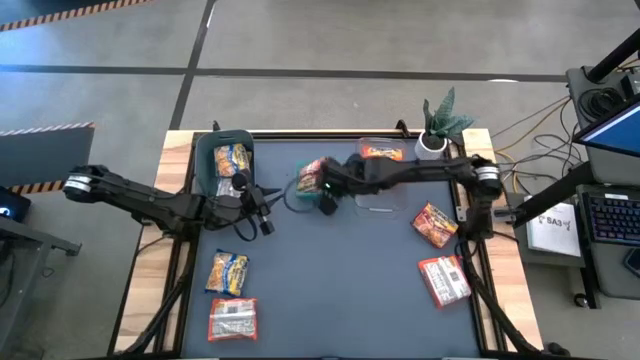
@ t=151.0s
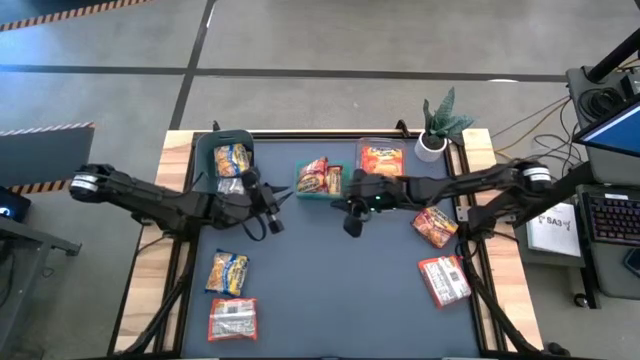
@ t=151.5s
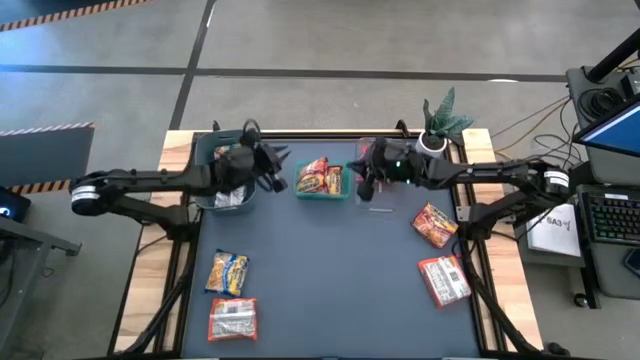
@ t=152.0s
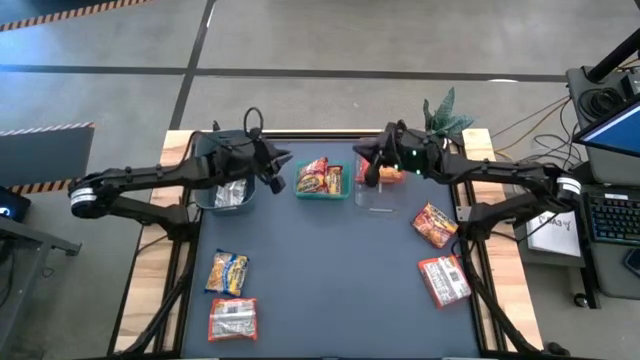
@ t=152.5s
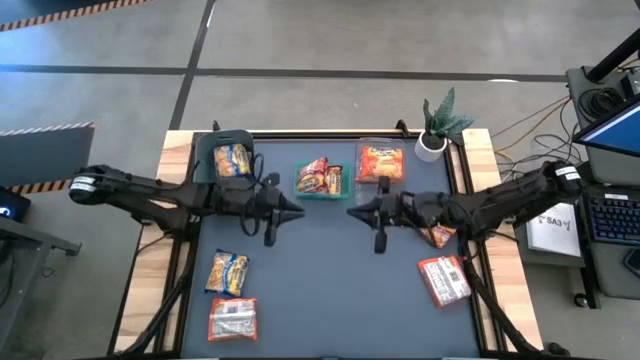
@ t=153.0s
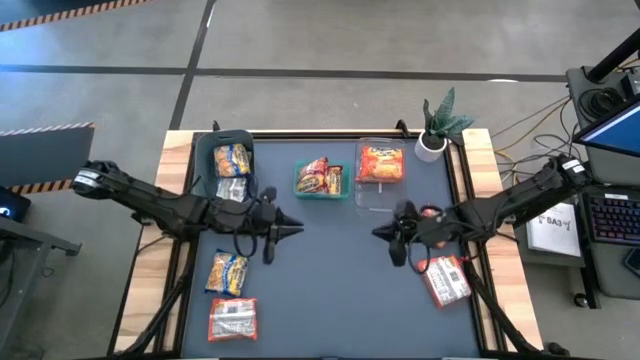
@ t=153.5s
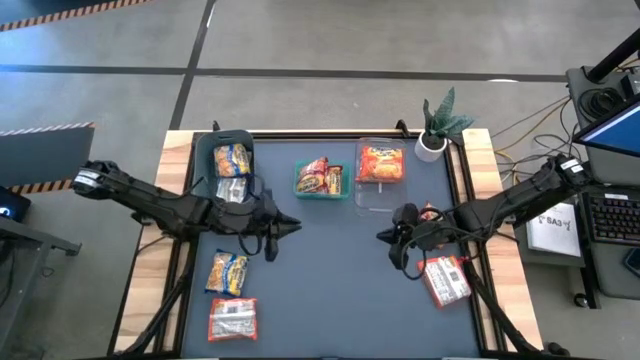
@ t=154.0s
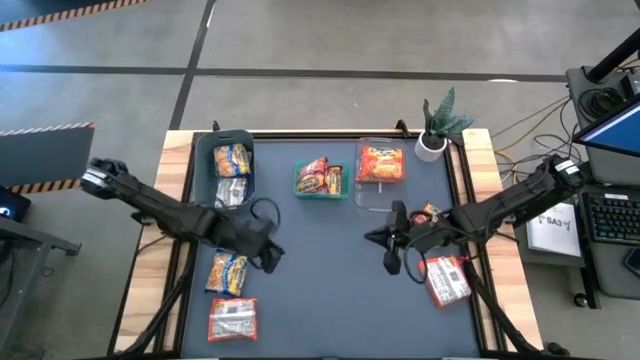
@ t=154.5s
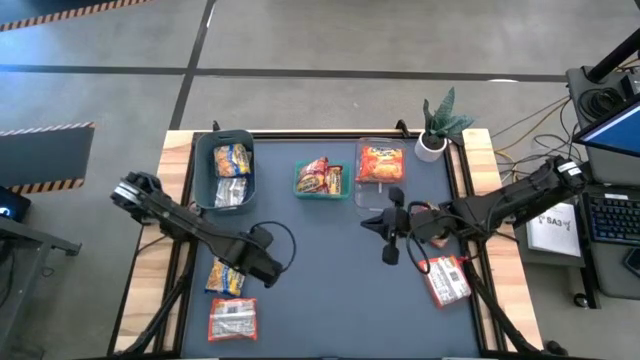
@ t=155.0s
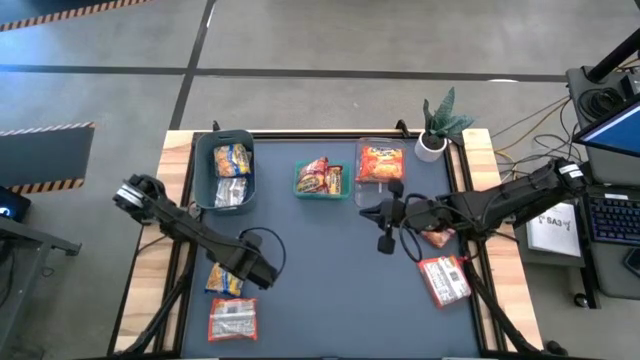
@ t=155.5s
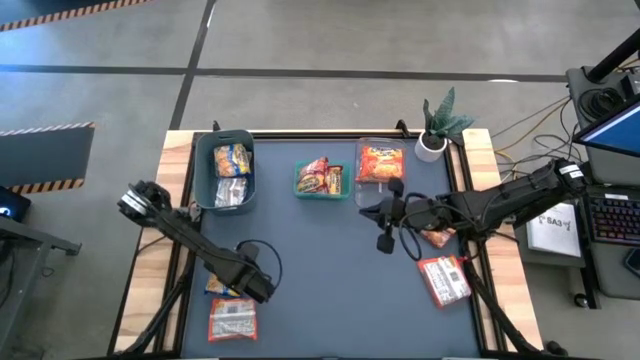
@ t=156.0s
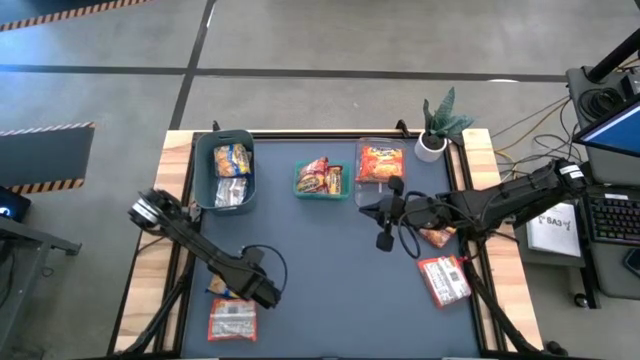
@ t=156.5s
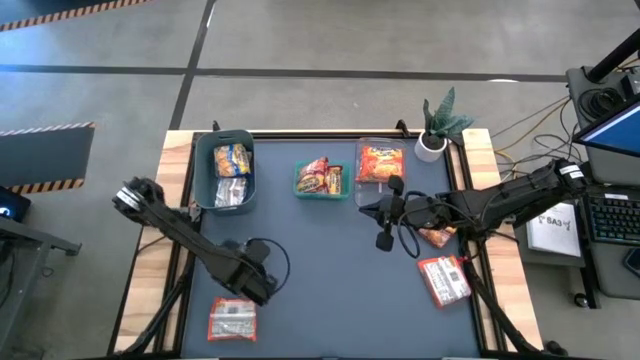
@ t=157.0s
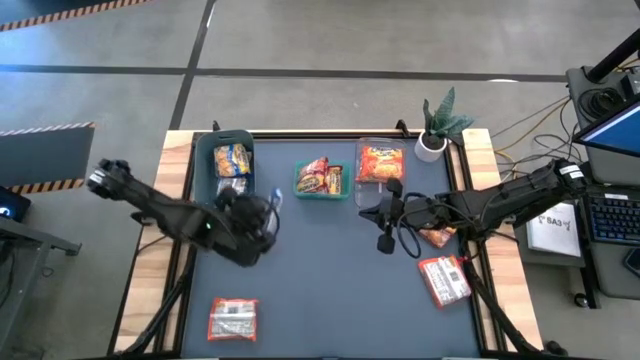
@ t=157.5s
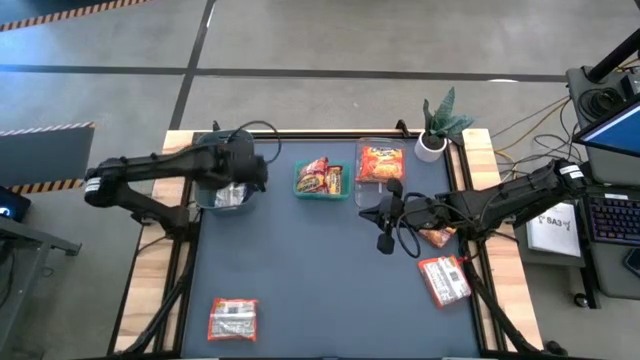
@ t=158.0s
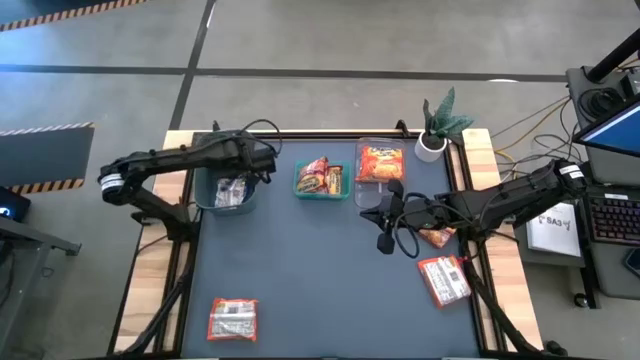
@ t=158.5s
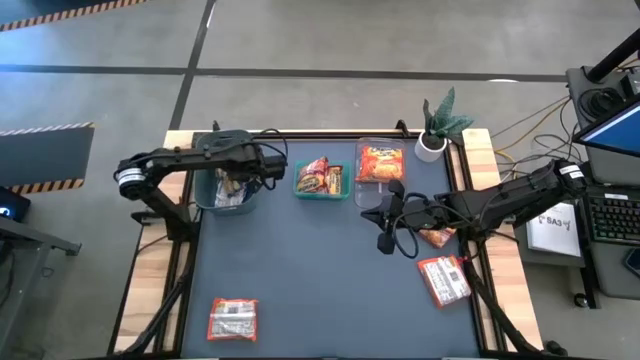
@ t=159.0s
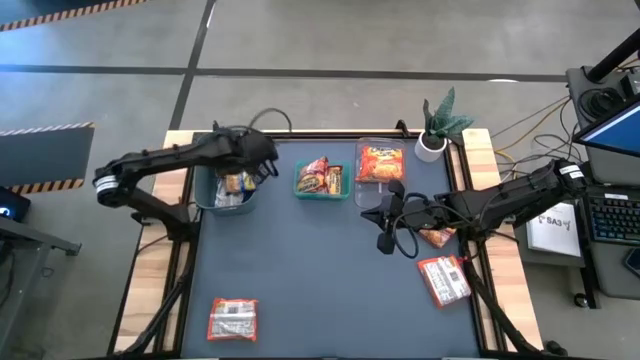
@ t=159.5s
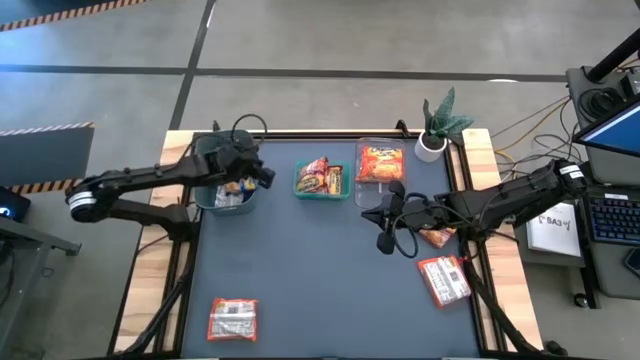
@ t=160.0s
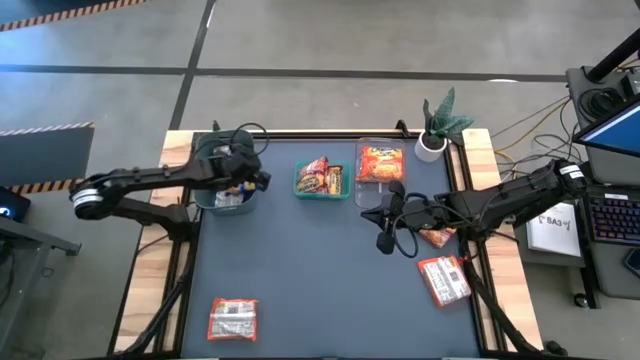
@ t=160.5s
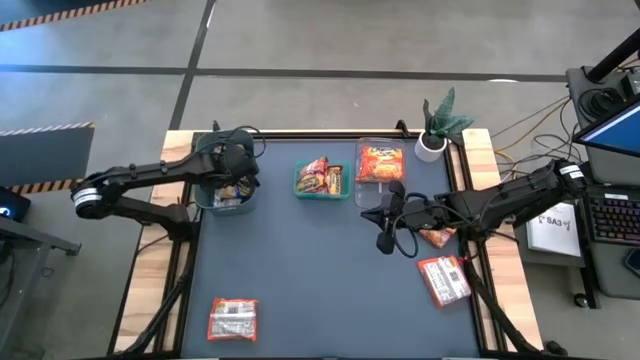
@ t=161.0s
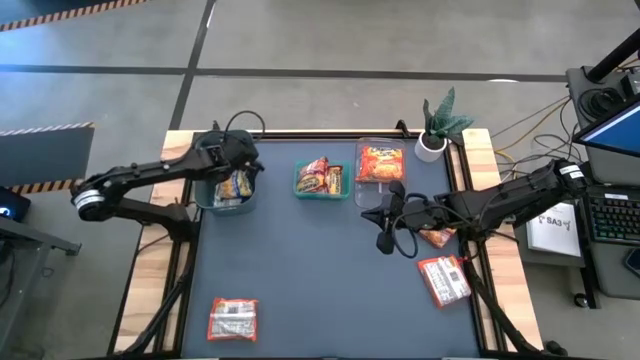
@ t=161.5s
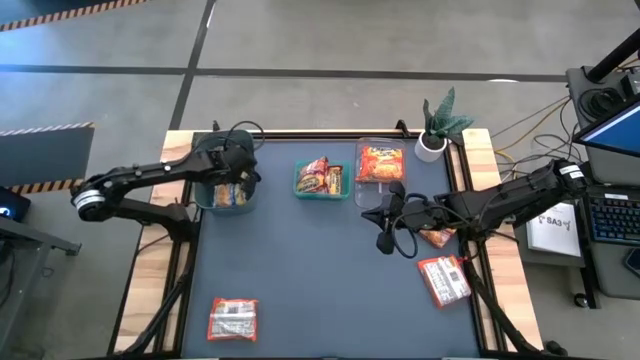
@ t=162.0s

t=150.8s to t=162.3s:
Task: Sort Maruchan noodles
Put the blue noodle pack into the dark blue bin

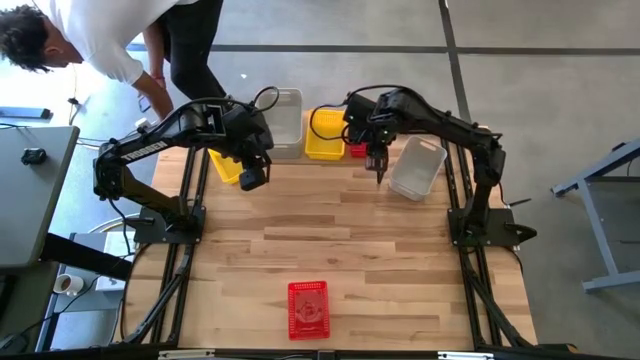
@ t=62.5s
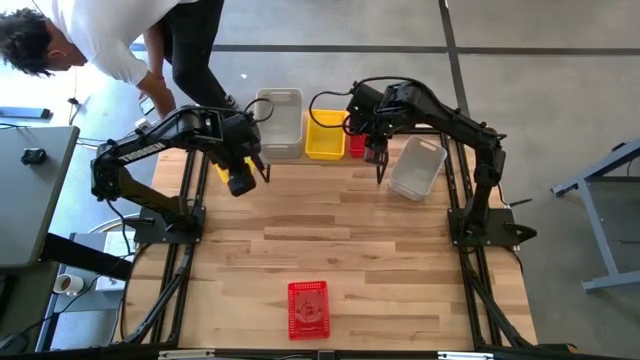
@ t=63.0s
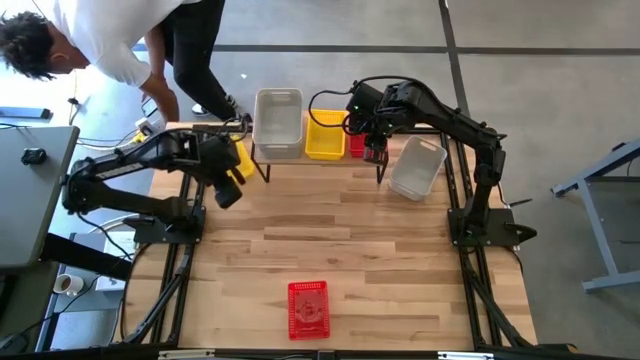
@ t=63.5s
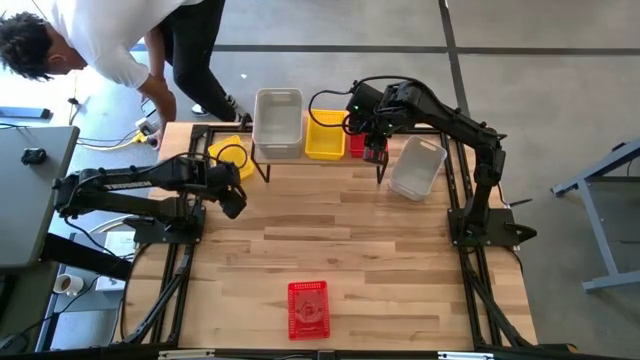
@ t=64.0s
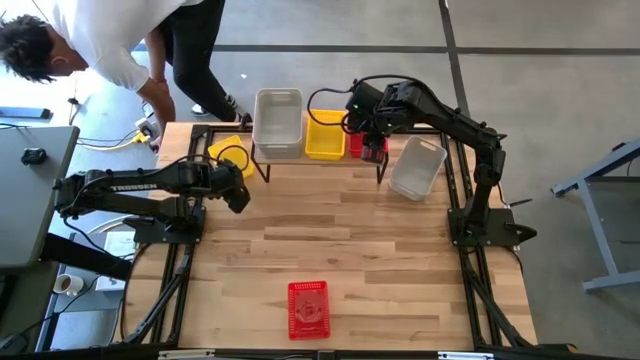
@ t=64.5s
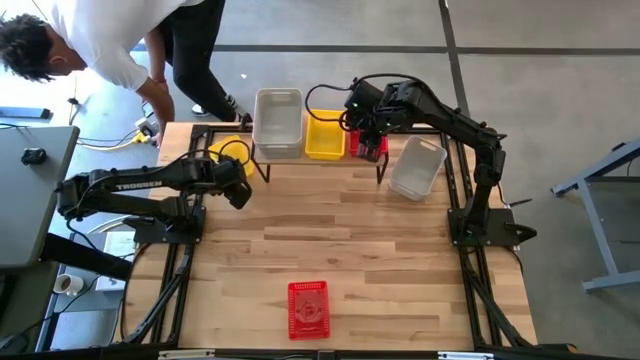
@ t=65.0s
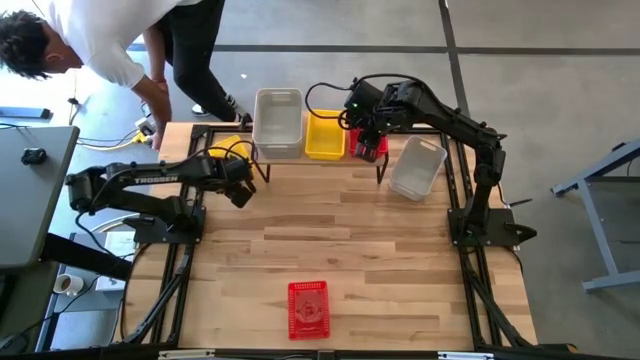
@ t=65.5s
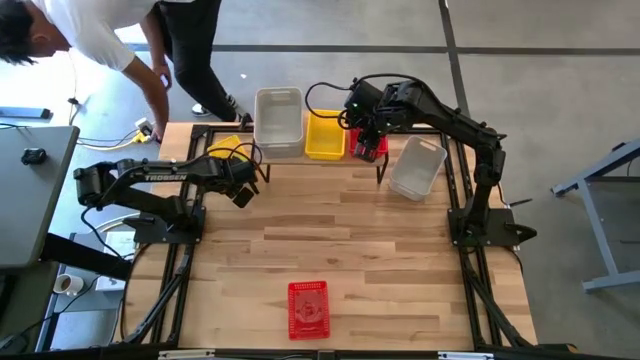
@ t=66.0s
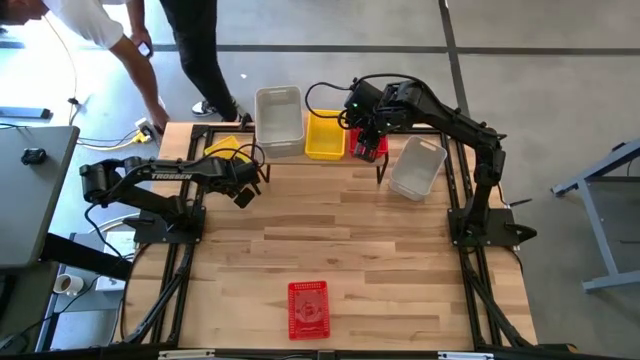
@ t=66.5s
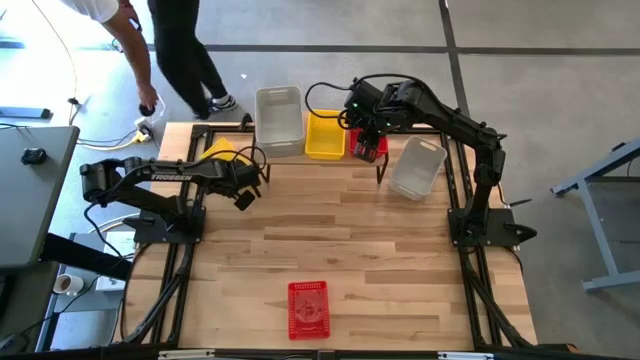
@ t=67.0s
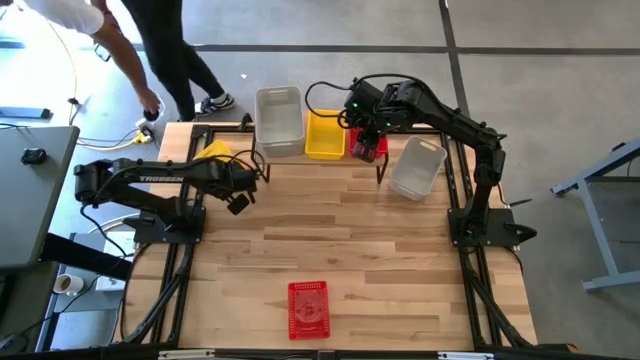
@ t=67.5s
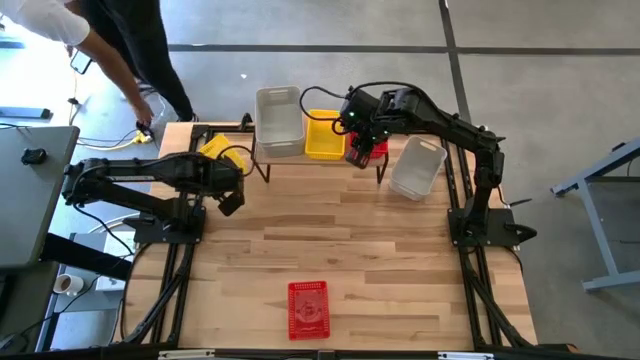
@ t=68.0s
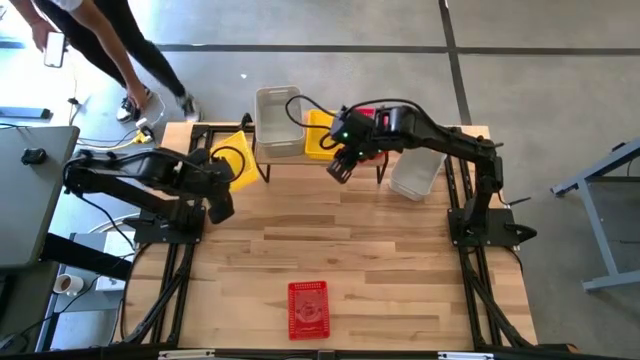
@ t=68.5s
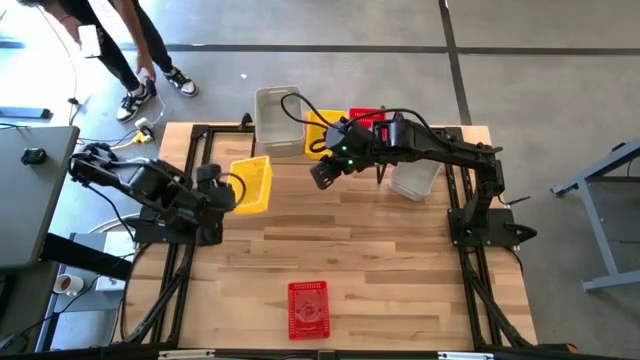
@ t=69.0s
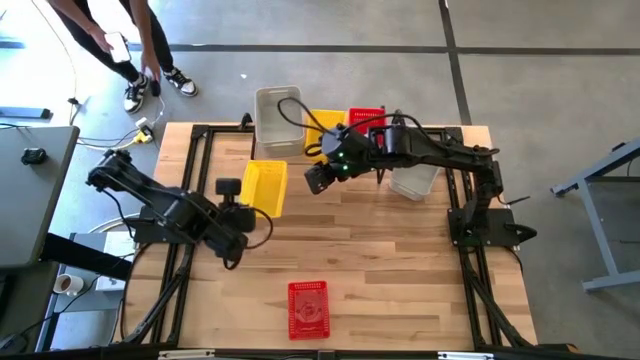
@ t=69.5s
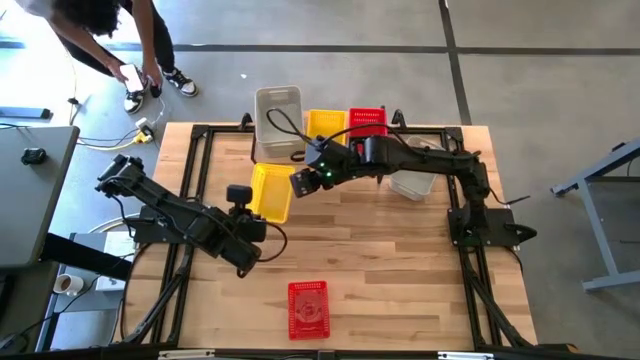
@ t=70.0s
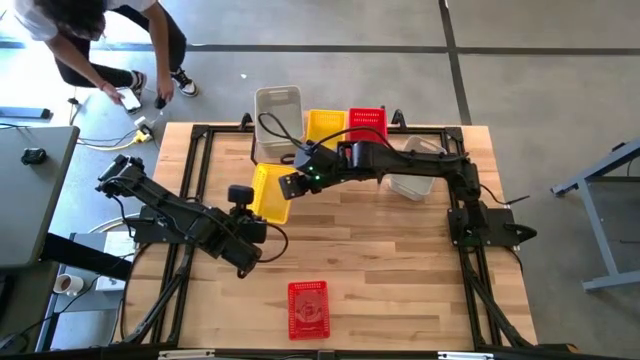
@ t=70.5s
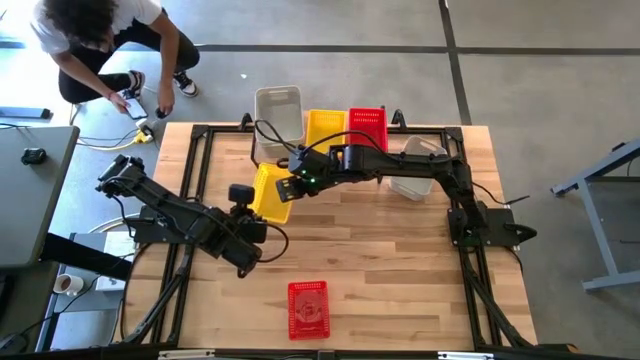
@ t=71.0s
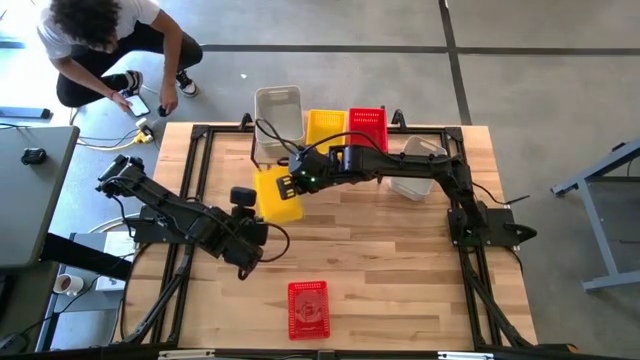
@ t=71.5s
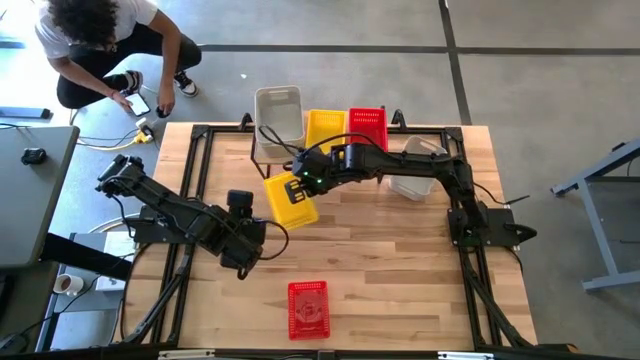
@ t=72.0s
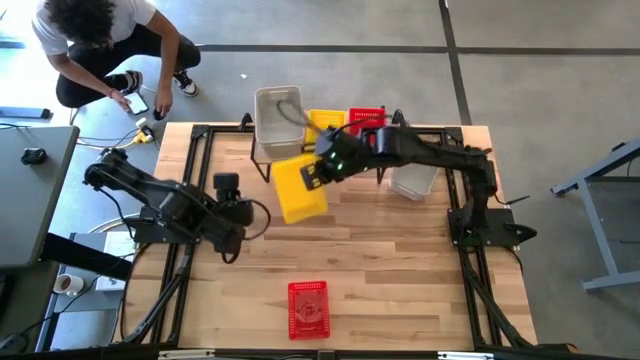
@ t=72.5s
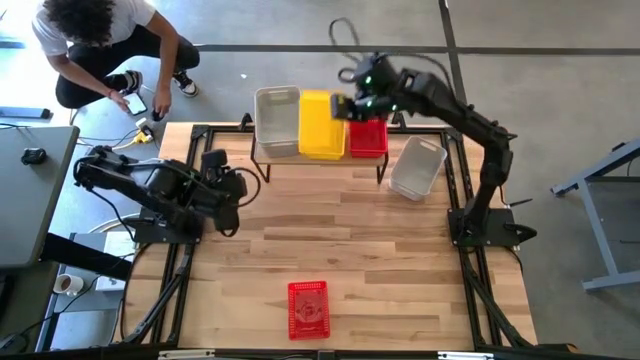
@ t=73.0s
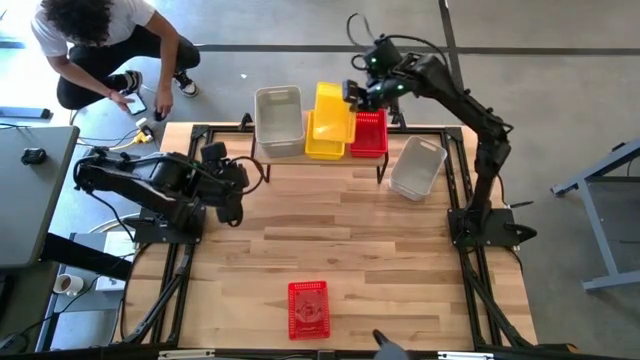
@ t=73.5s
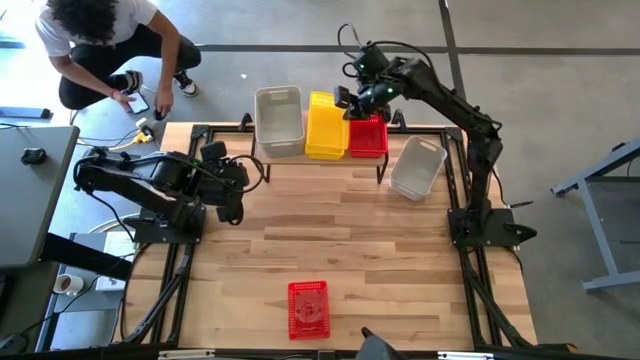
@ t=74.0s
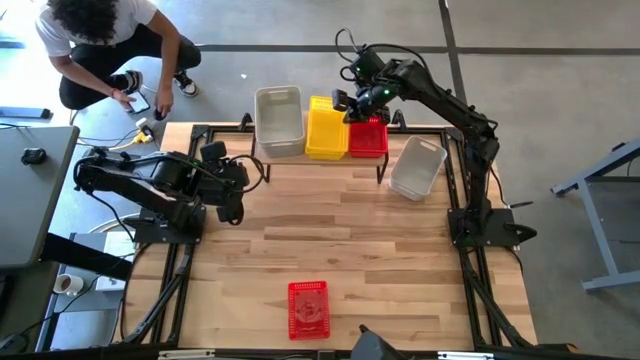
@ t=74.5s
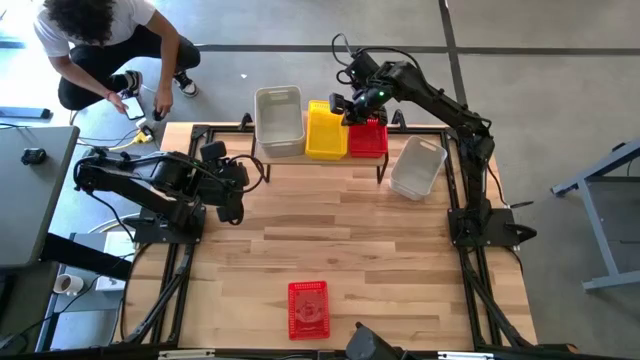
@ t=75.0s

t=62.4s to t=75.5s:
Task: Stack baskets on shelf by color
Stack the yellow bin on top of the other yellow bin on the shelf
